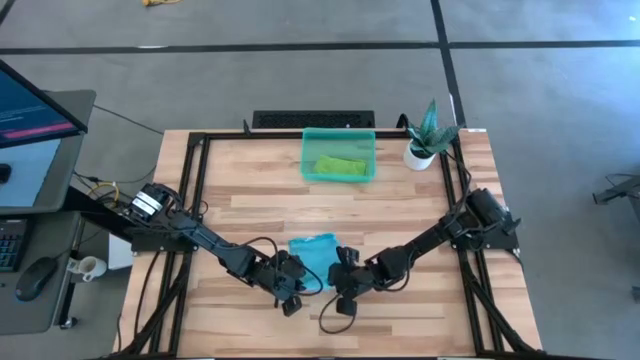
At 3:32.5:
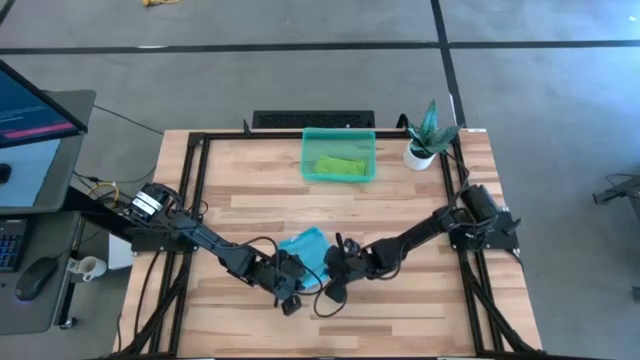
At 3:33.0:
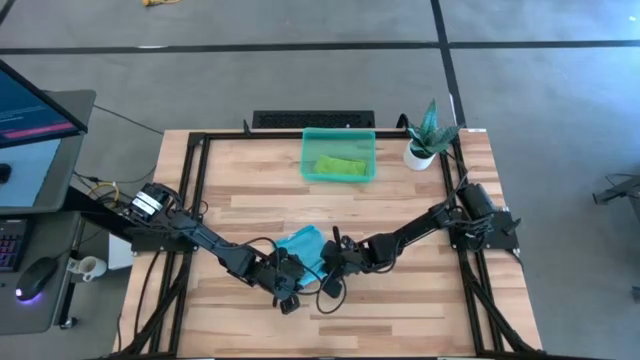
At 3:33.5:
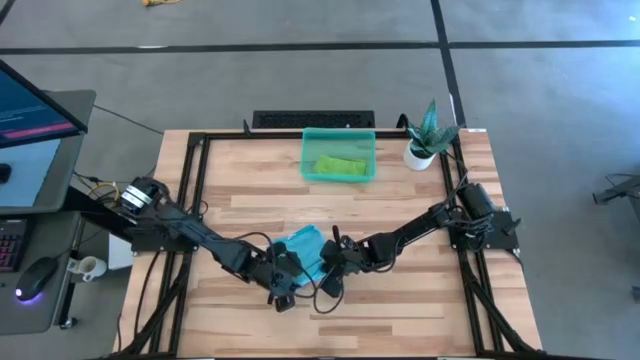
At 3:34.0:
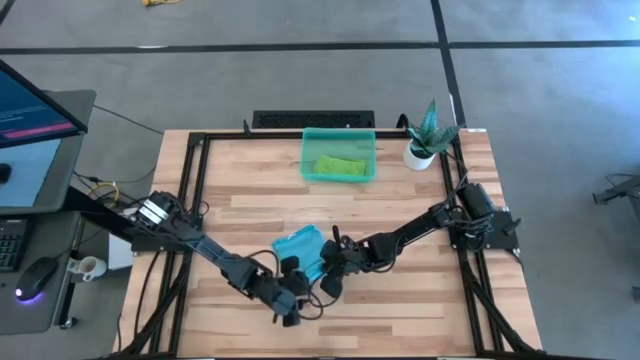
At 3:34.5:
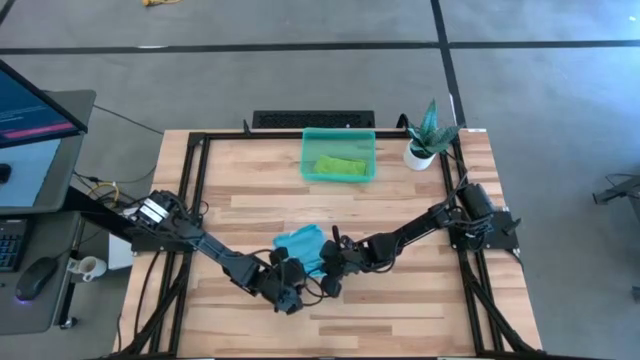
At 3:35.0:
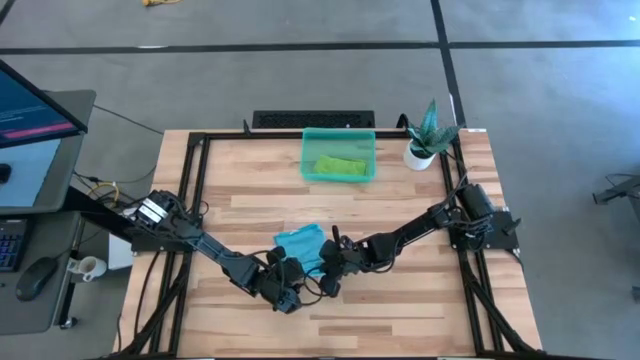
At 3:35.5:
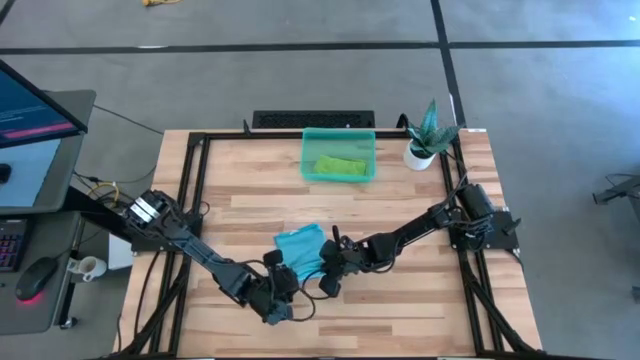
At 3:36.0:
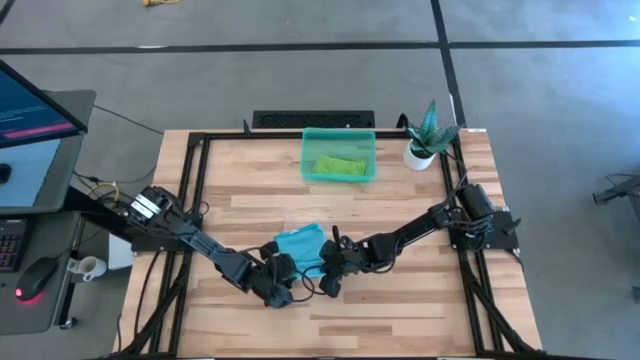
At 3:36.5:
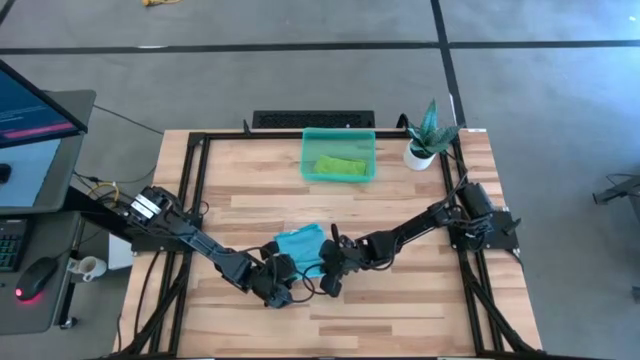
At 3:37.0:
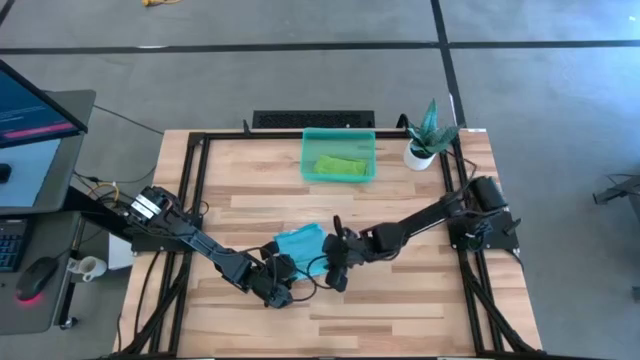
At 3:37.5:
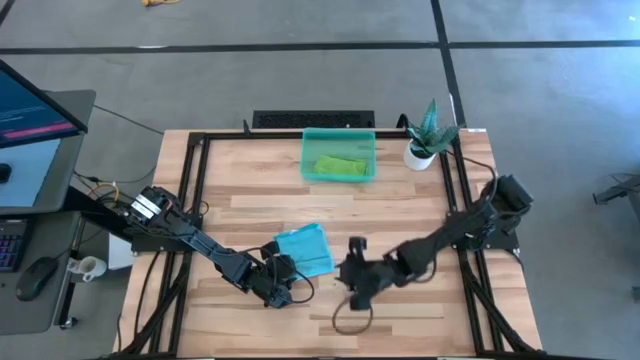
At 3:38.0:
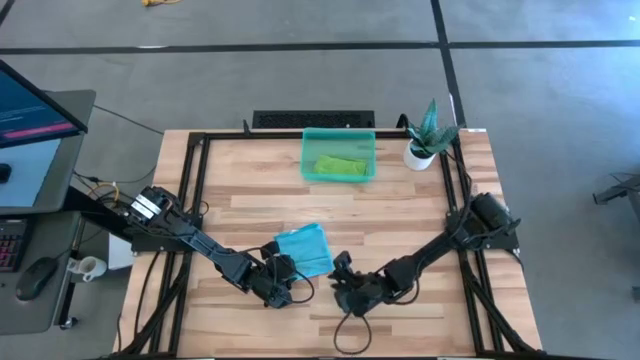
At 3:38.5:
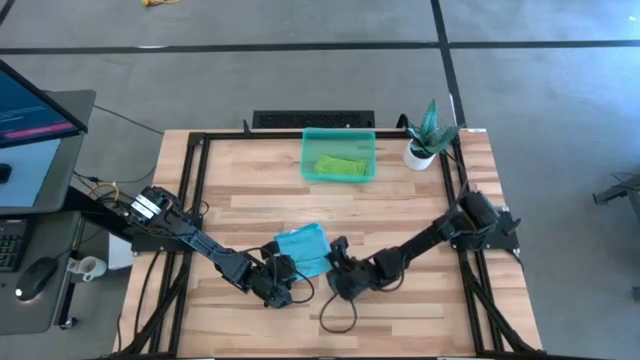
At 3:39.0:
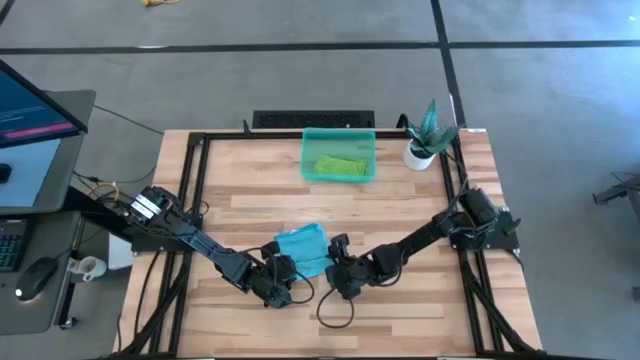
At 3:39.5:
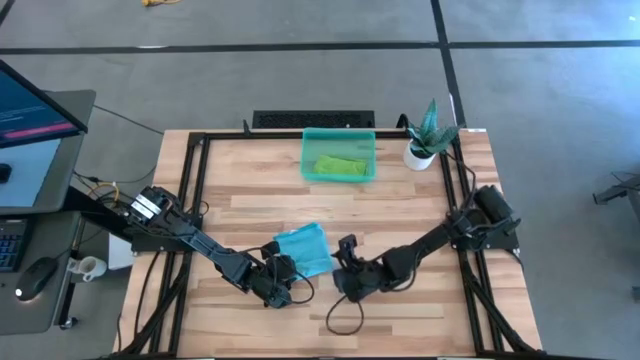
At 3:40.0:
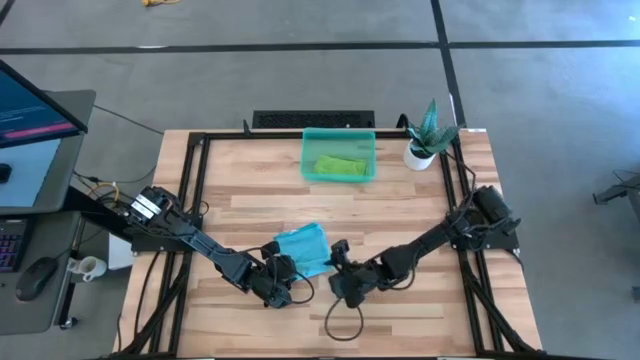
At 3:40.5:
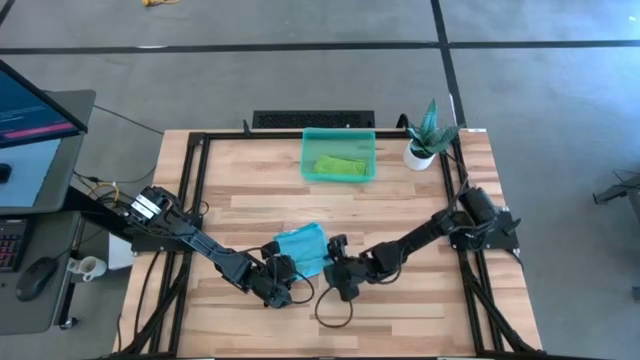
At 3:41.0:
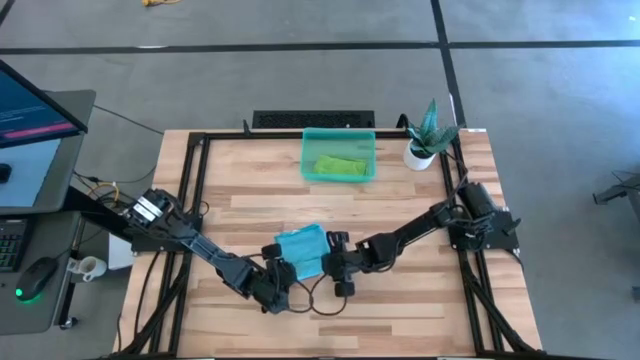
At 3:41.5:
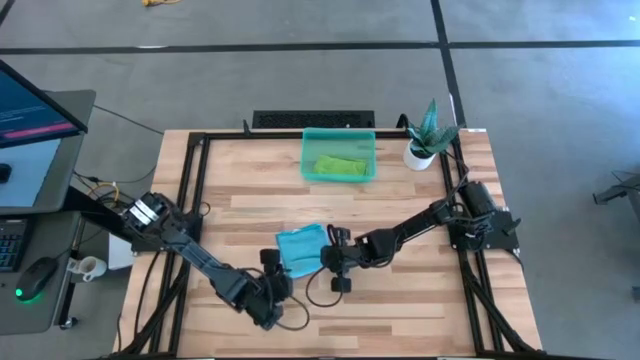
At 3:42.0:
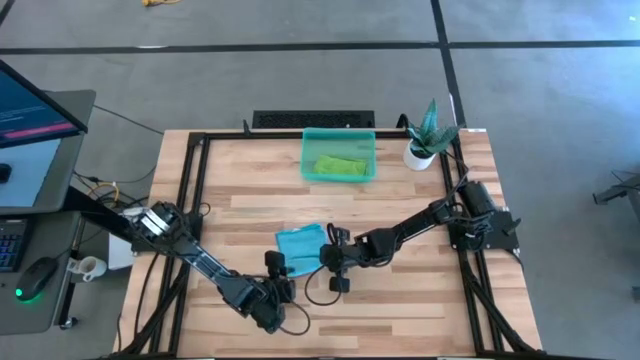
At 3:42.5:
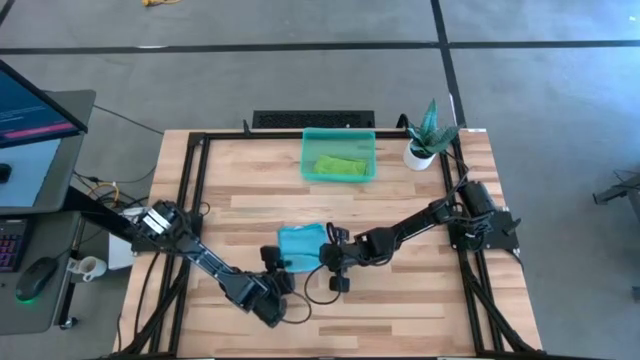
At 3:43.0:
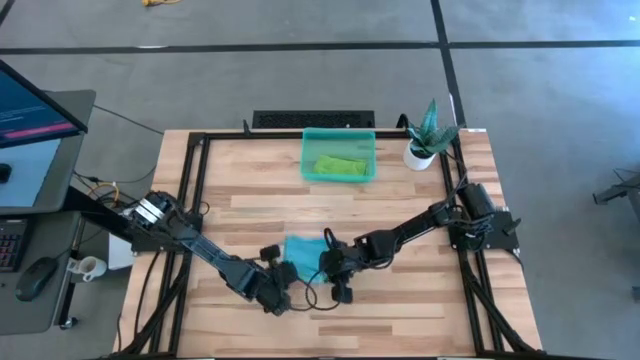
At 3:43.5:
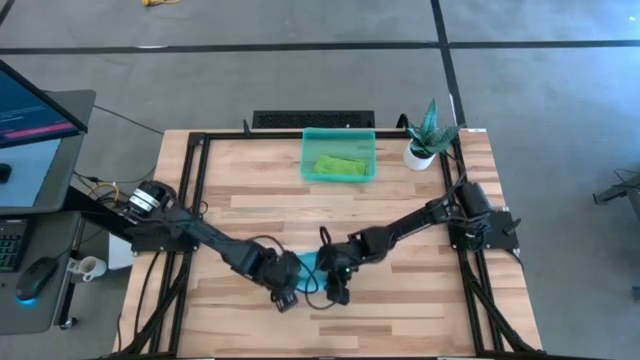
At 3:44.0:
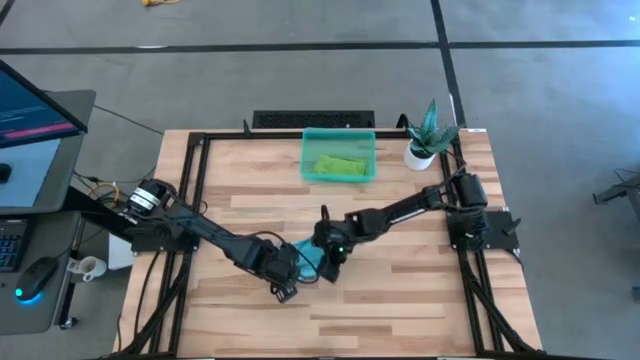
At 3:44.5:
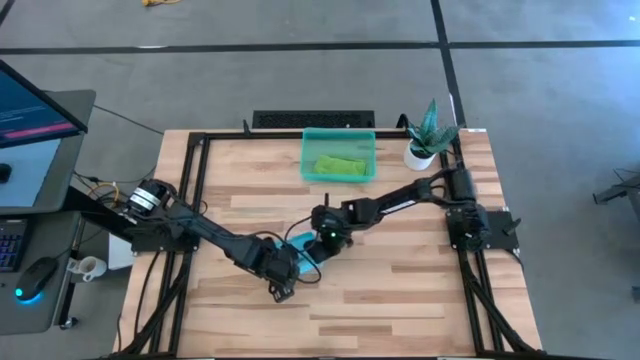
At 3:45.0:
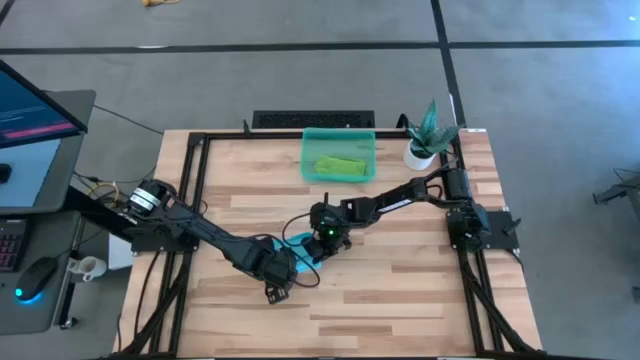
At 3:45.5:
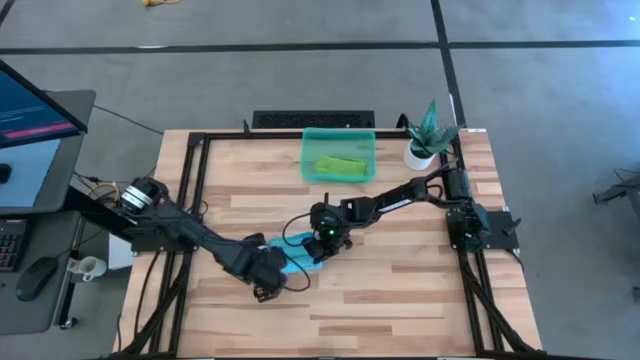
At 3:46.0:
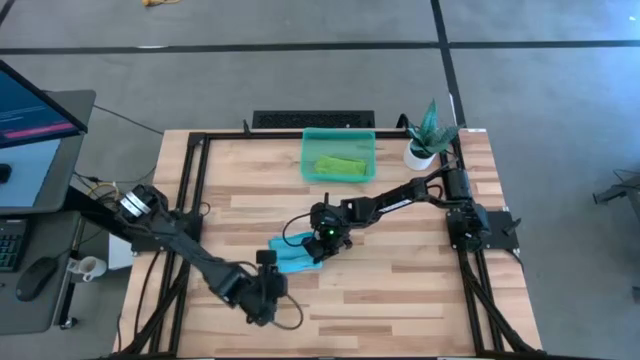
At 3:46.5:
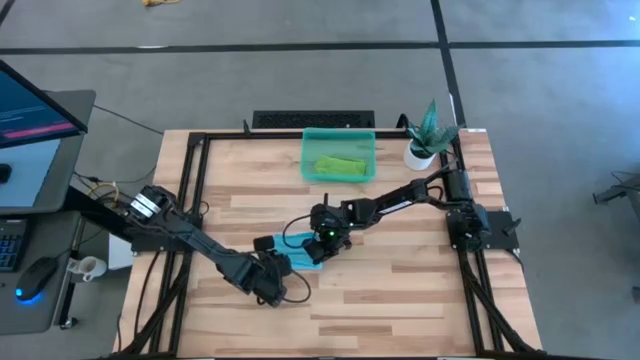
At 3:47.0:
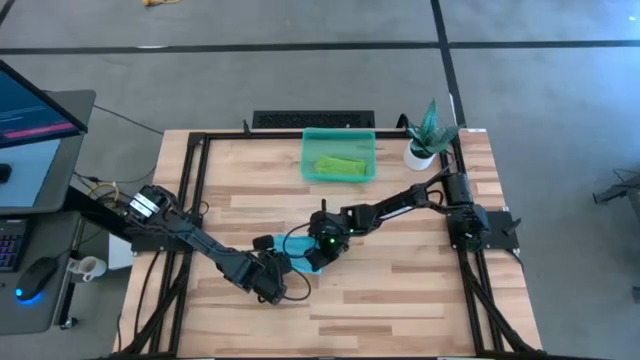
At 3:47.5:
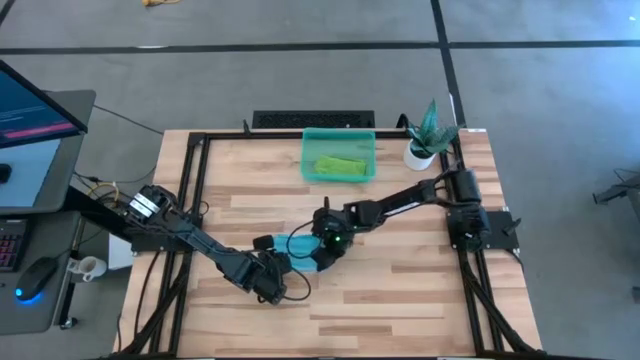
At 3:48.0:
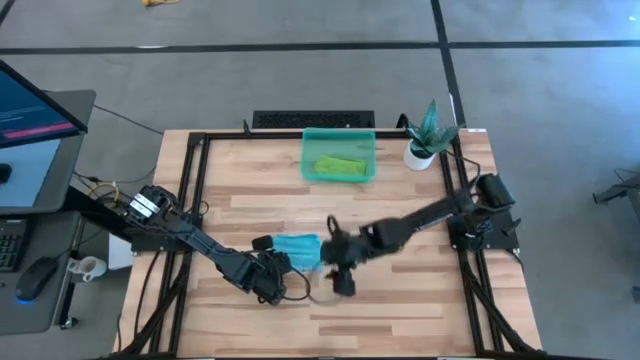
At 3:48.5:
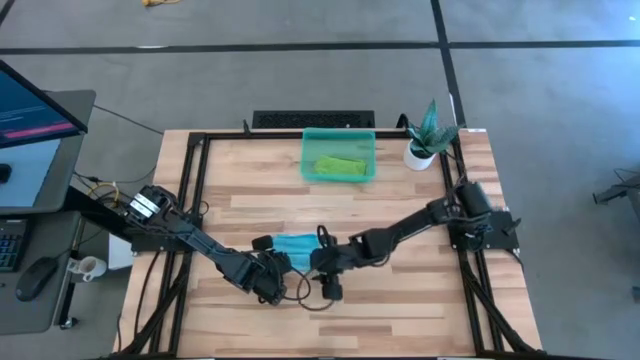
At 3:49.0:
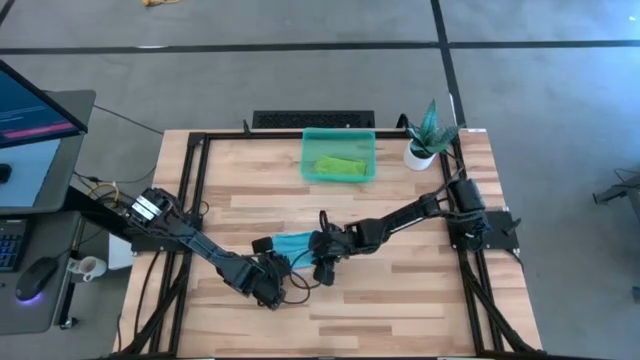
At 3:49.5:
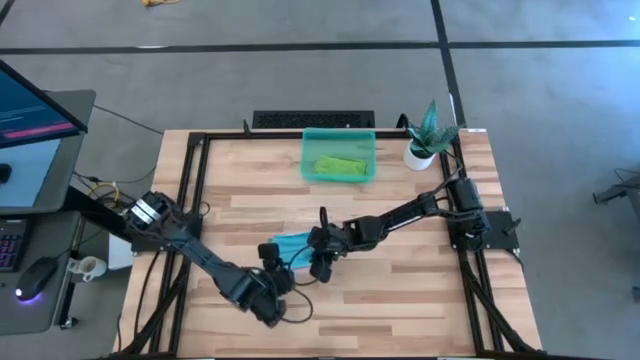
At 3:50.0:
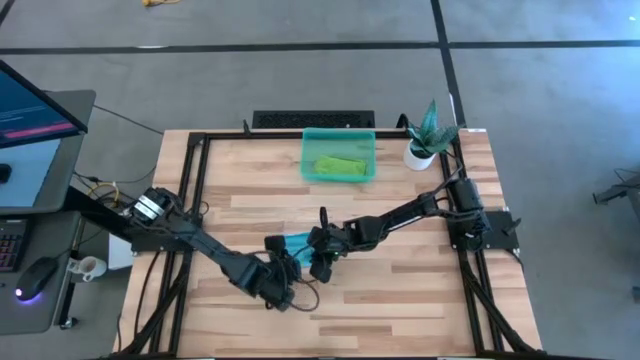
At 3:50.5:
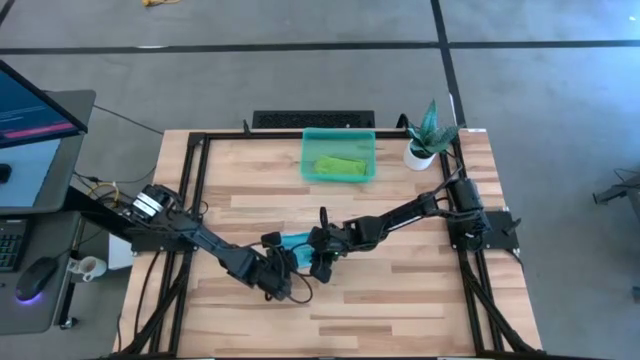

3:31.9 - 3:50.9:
Task: Roll microfiber towels into tight, uniform cylinder then place into a basket
Roll the blue microfiber cloth

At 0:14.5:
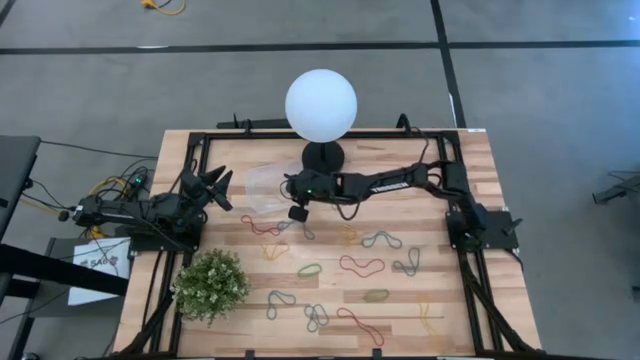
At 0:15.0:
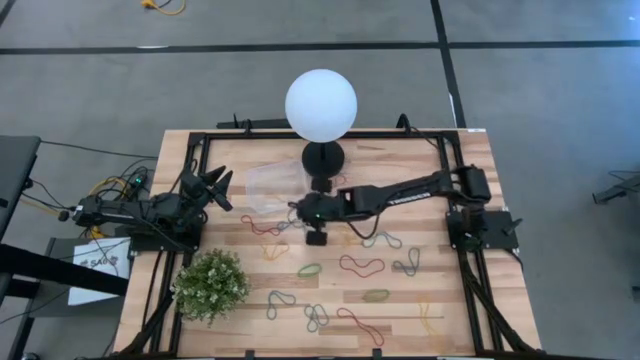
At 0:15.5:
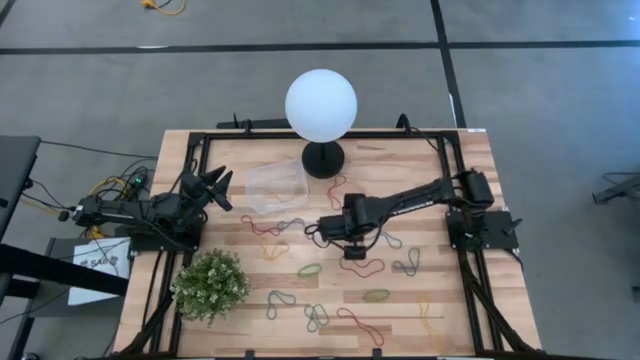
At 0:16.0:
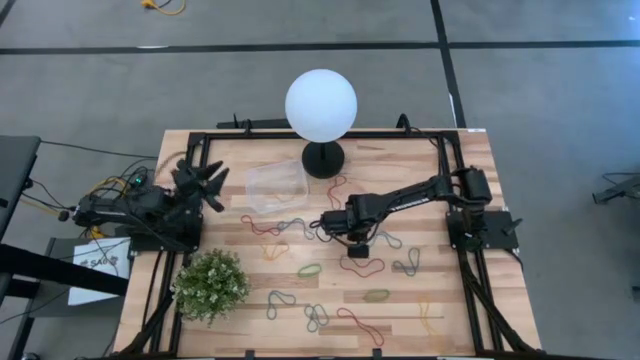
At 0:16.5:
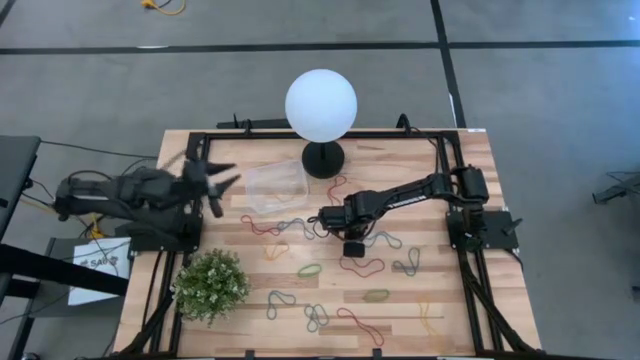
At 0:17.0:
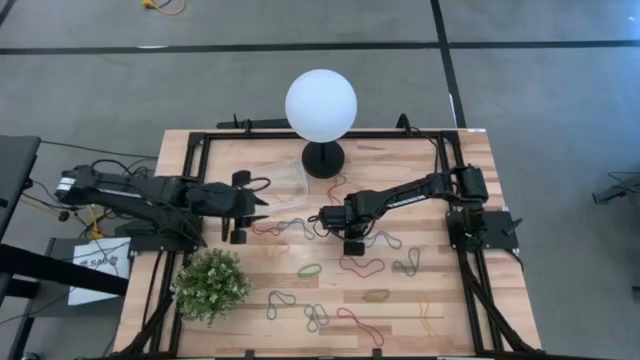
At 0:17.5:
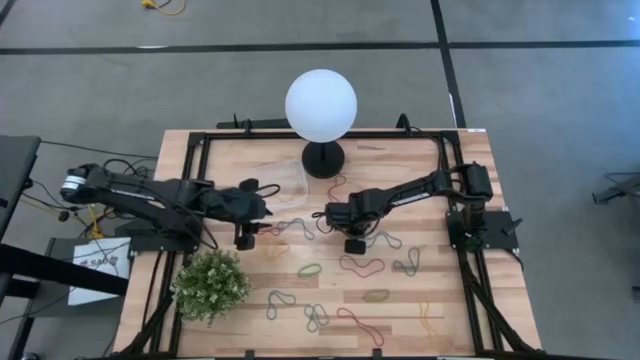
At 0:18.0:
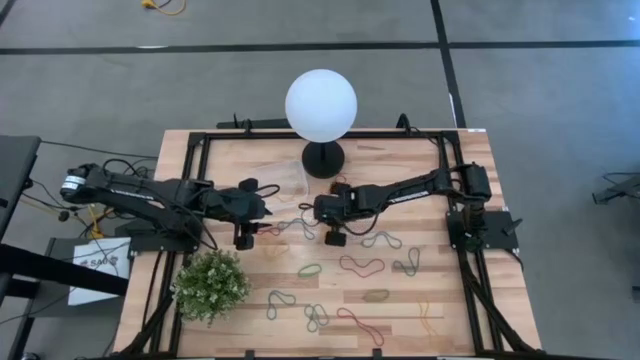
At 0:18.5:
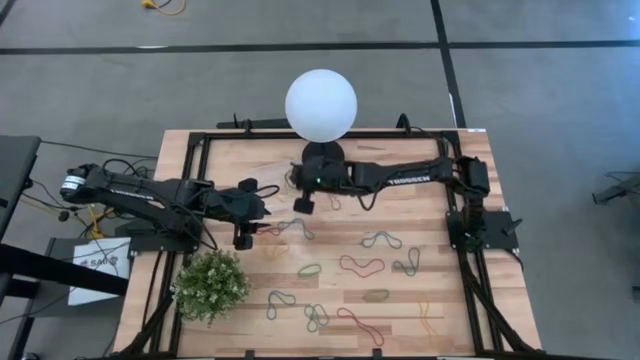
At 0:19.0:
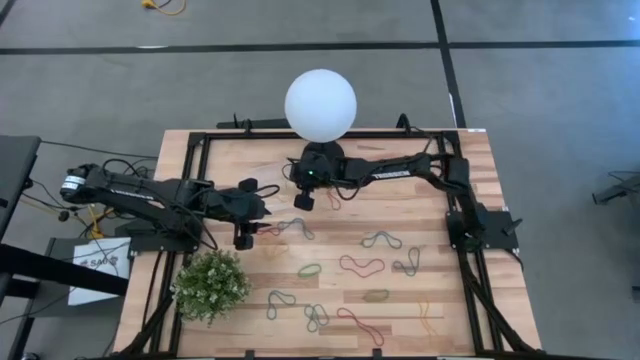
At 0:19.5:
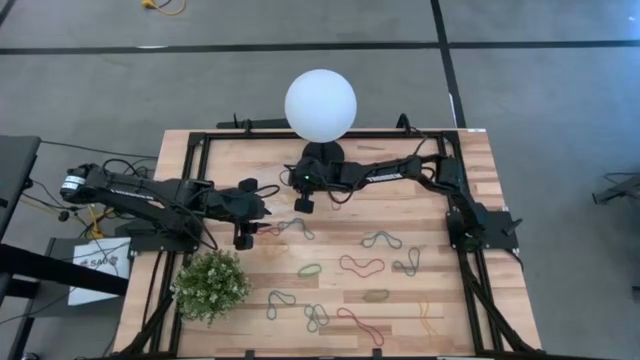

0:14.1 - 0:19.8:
Task: Pick and place items into bin
Put the yellow rubber band into the transparent bin
